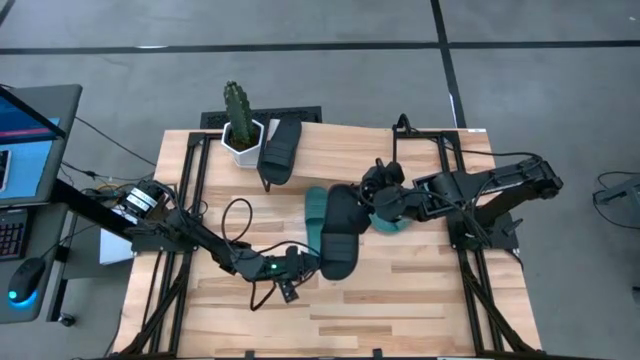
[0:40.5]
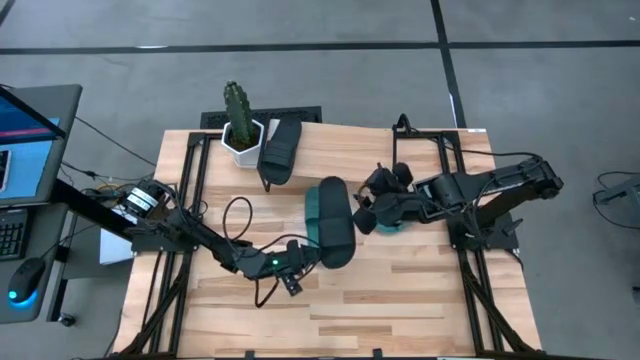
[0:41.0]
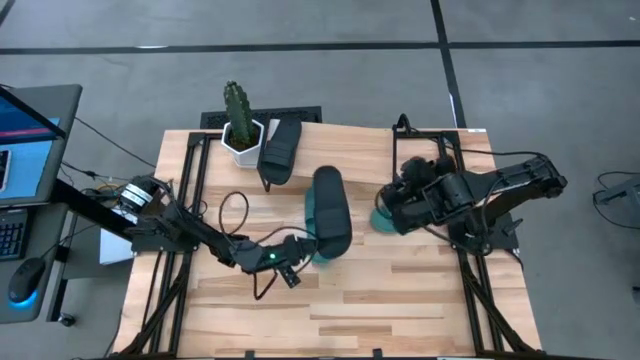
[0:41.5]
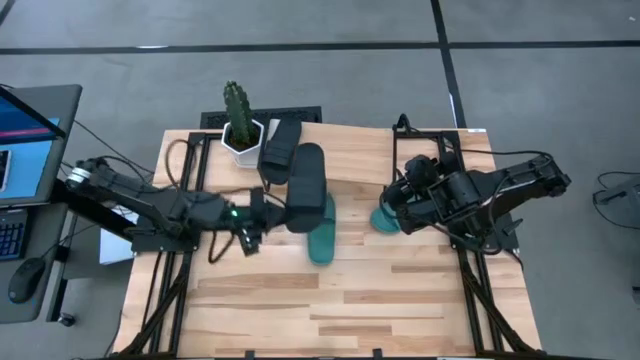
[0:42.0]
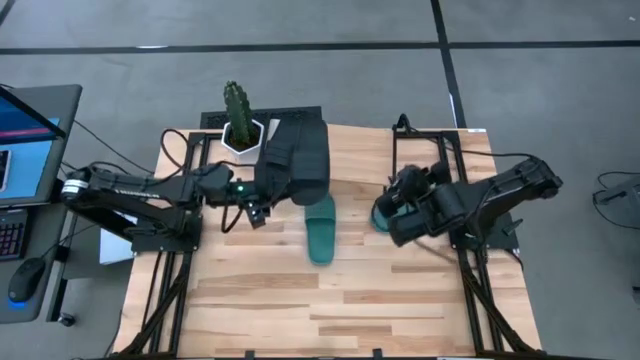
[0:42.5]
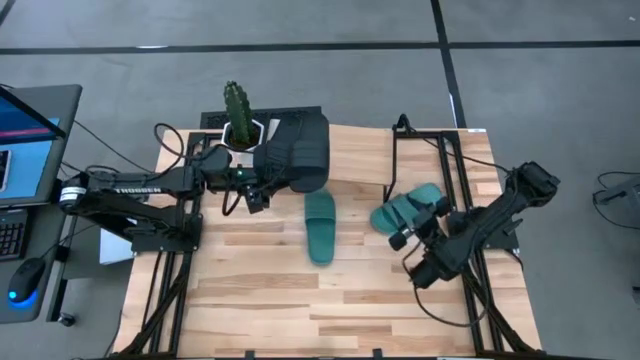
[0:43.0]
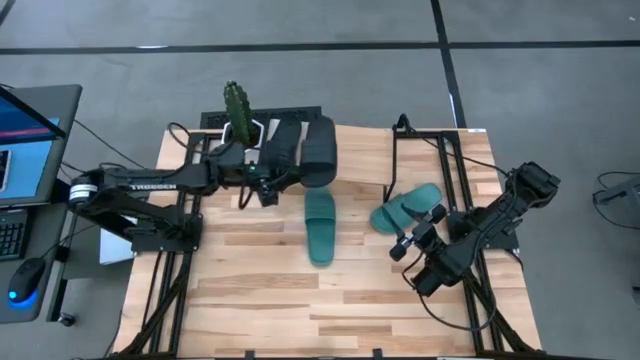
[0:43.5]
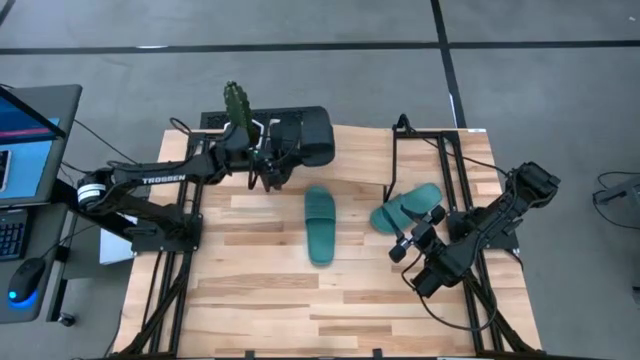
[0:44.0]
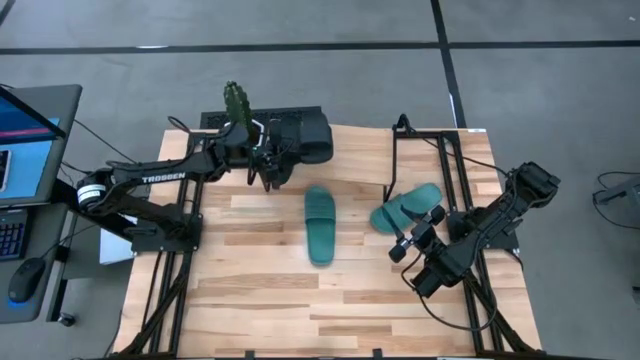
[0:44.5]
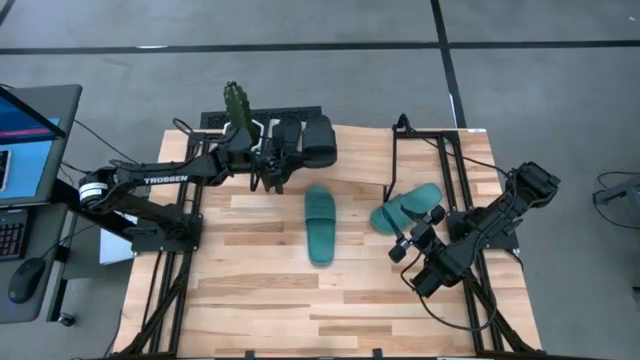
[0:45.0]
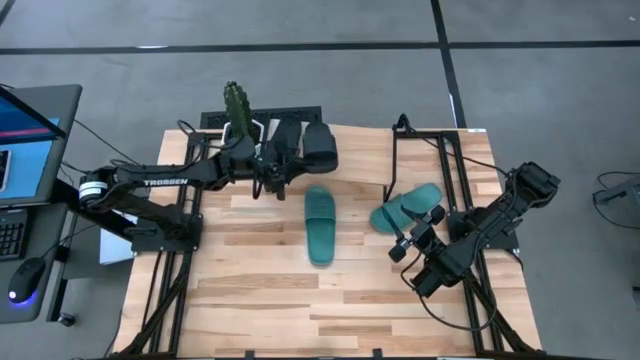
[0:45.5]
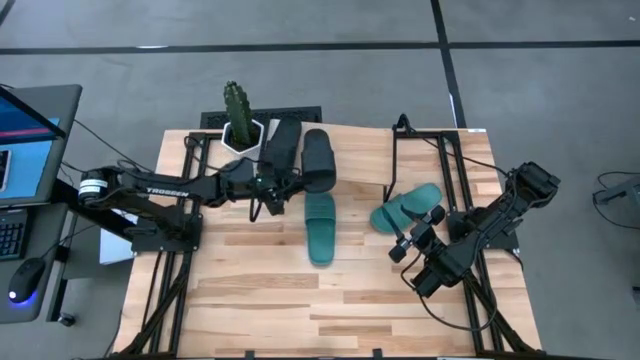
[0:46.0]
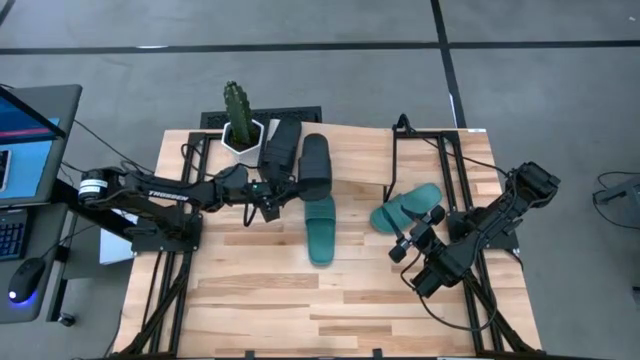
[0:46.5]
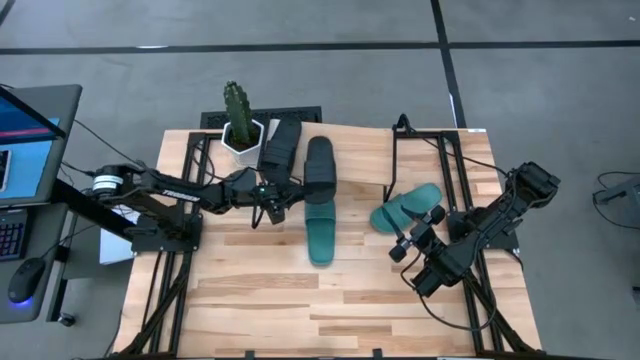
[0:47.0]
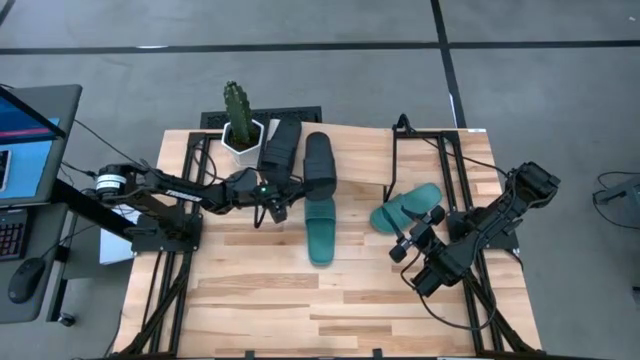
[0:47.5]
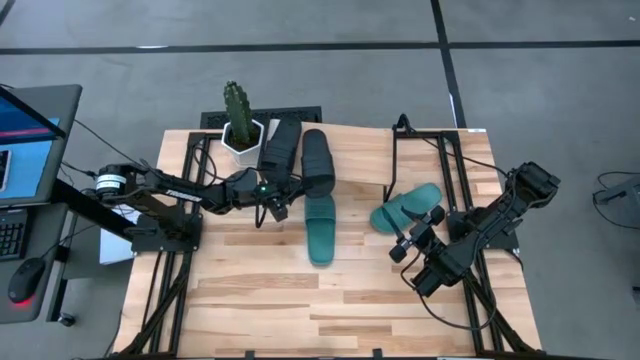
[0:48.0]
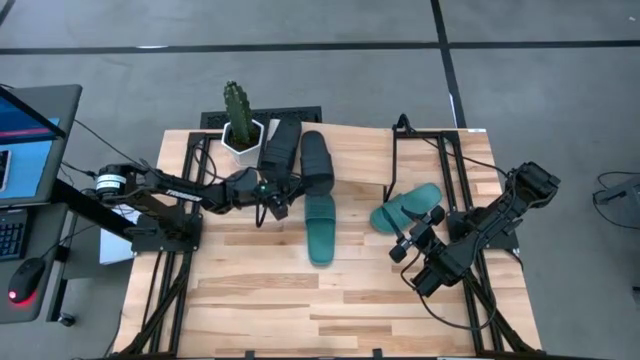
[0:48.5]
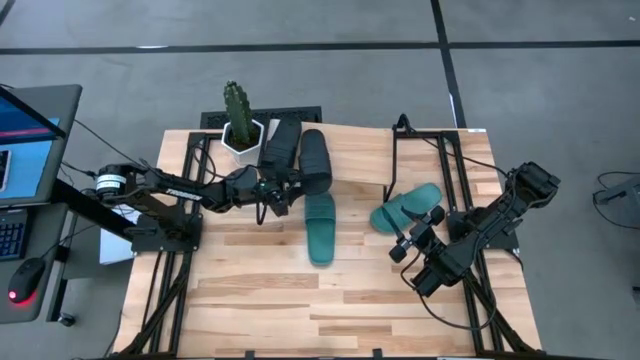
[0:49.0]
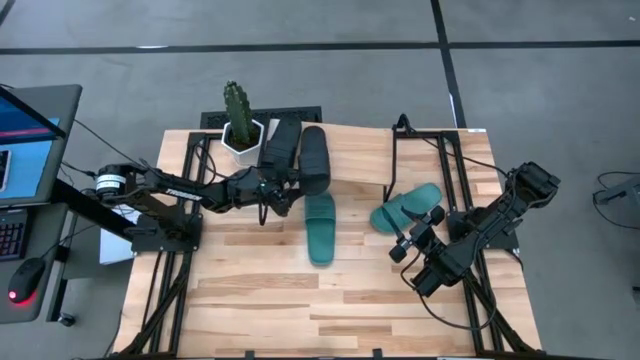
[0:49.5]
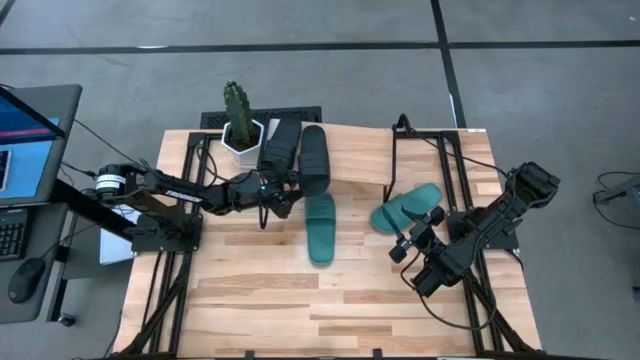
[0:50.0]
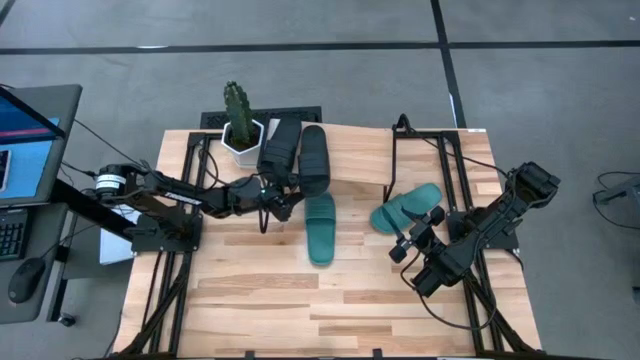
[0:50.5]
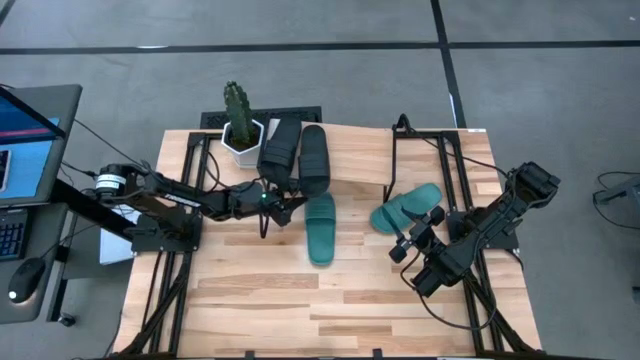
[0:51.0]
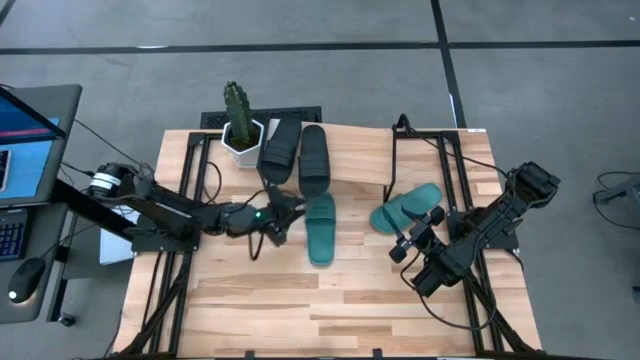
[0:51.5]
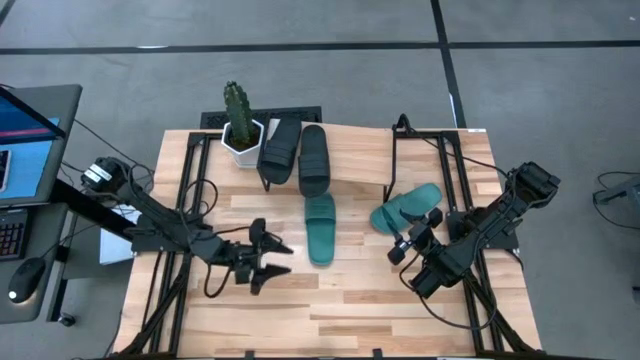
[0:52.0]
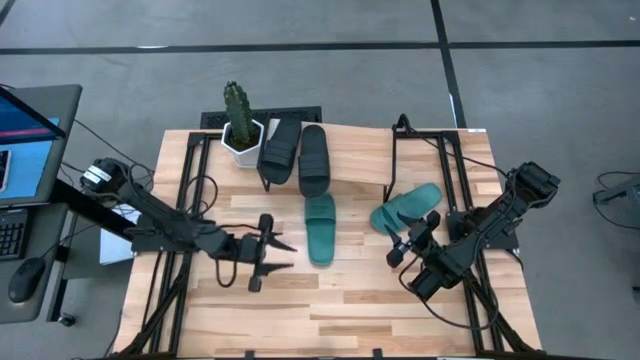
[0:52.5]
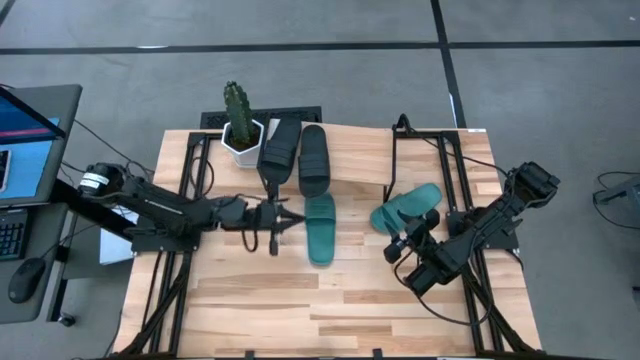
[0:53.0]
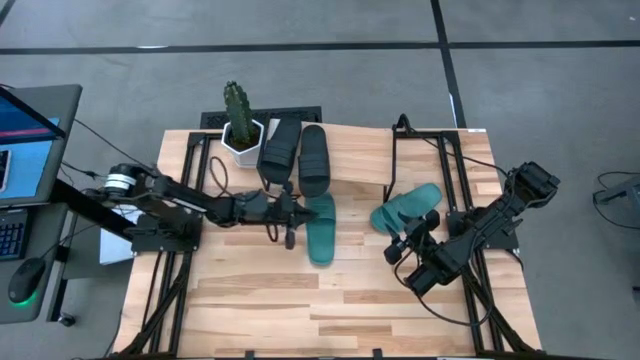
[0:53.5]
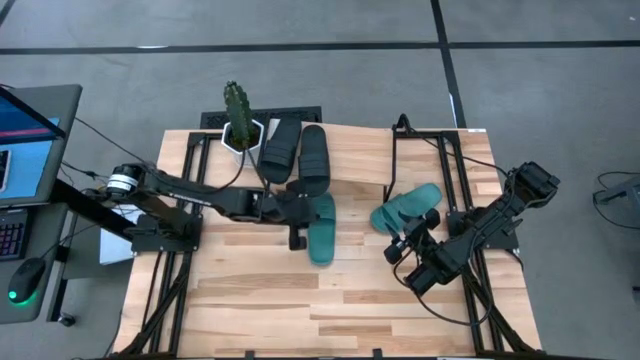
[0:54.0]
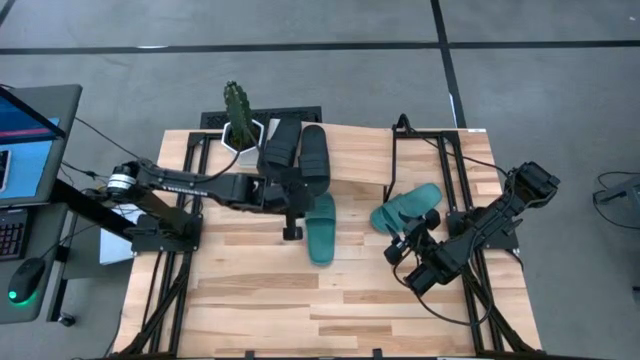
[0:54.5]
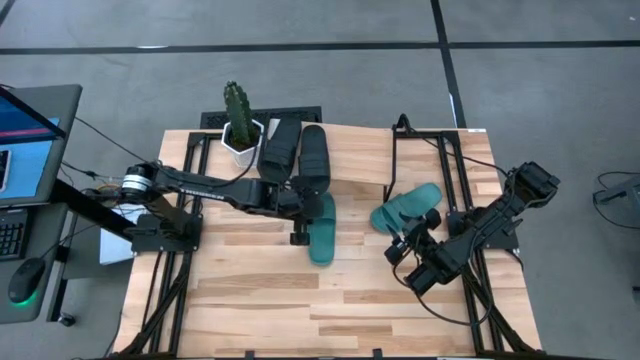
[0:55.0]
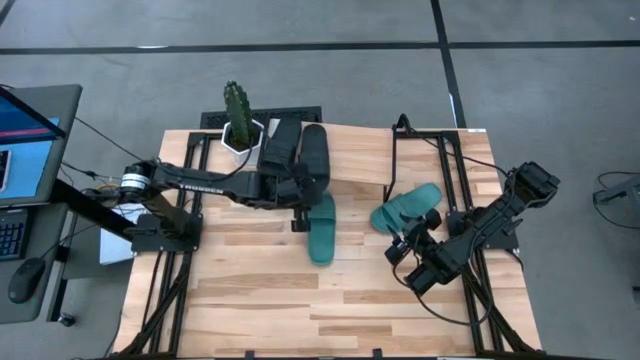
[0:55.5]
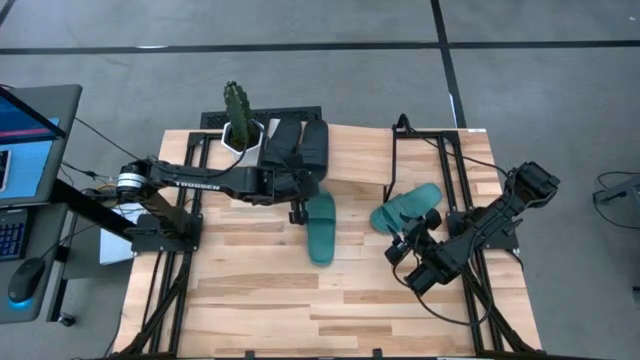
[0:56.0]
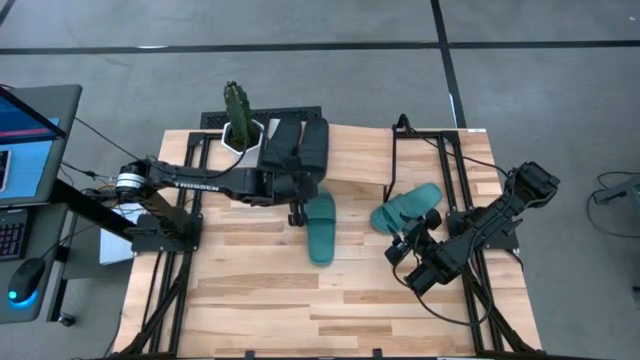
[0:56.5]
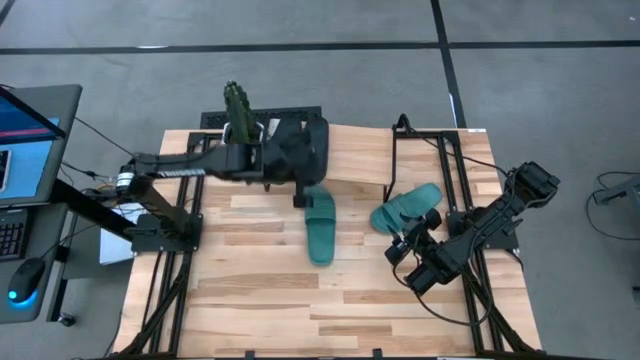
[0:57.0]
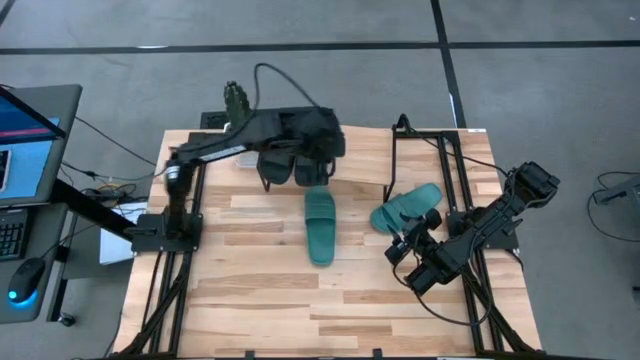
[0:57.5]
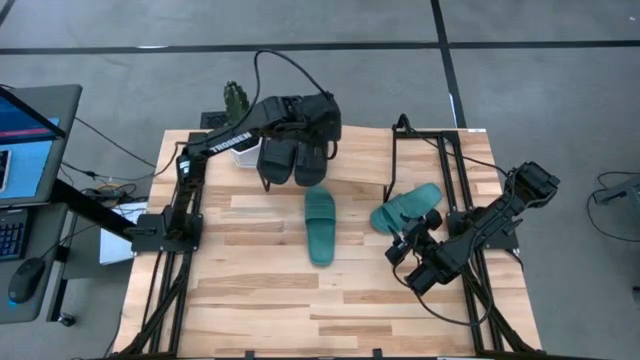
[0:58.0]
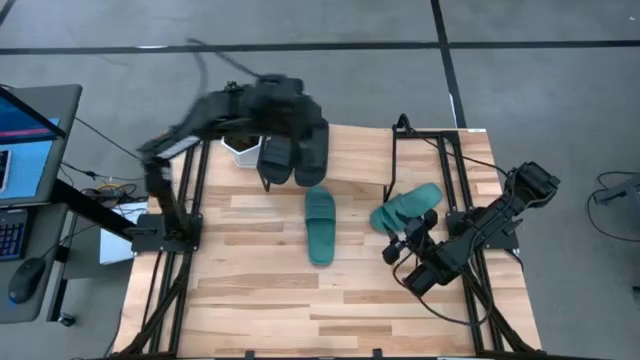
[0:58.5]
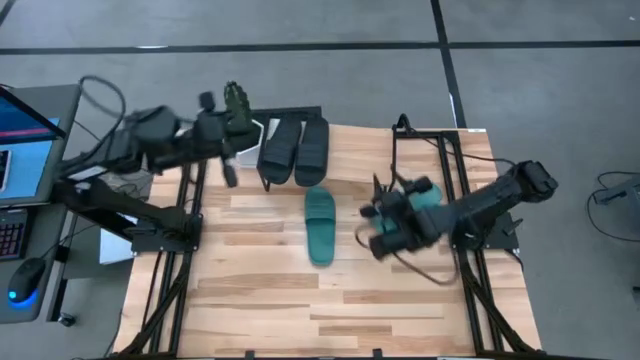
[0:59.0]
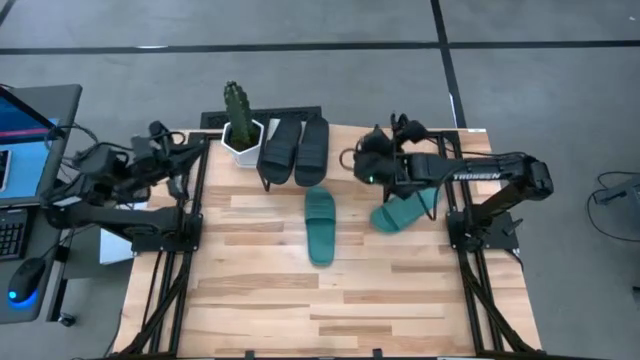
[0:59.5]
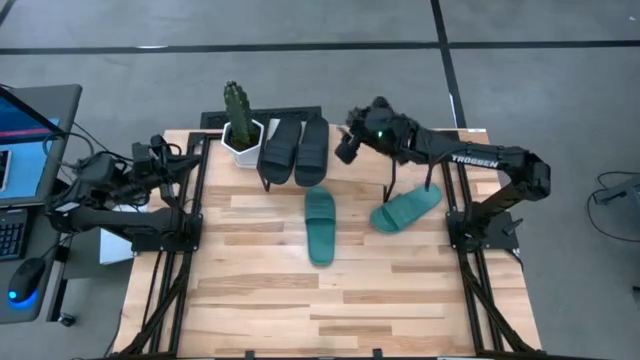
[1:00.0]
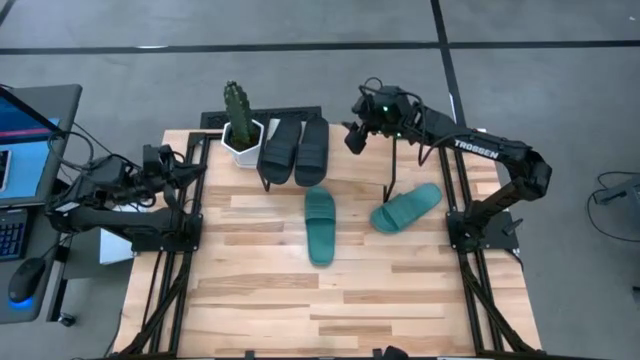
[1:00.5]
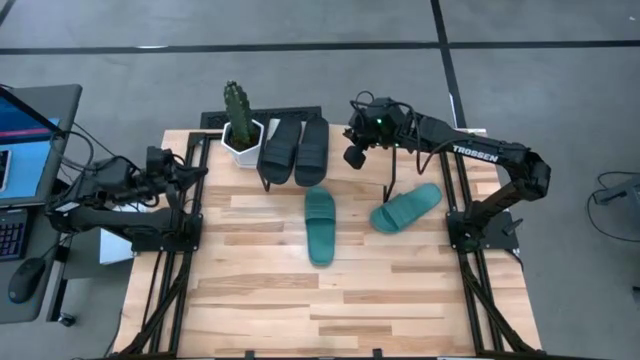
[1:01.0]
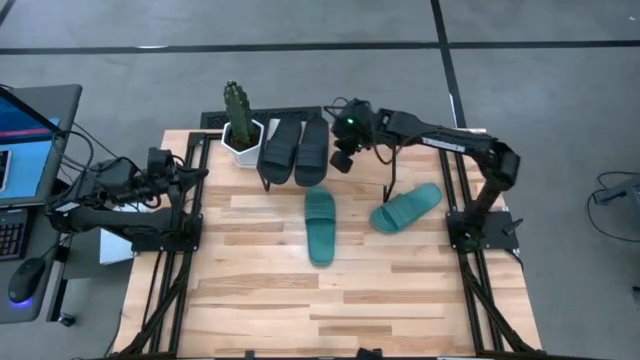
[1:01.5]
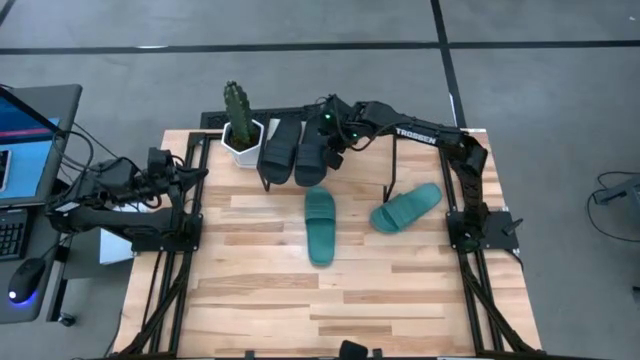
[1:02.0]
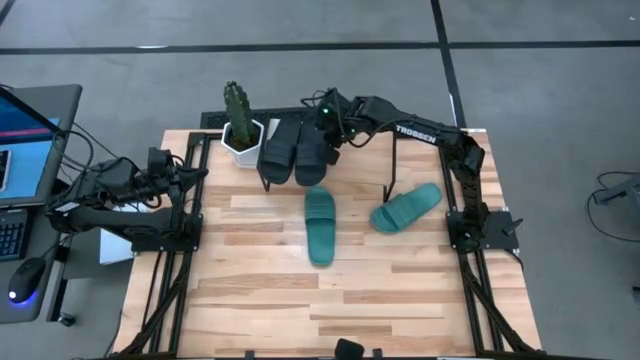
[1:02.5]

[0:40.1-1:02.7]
Task: Pick and place slides into the shelf
Put the black slides on the shelf
